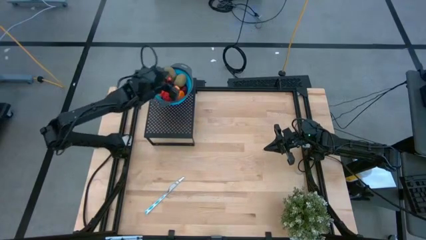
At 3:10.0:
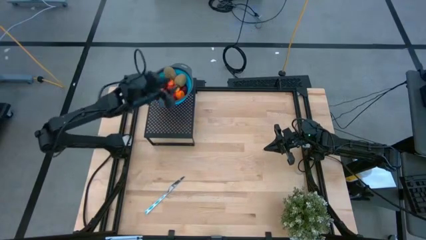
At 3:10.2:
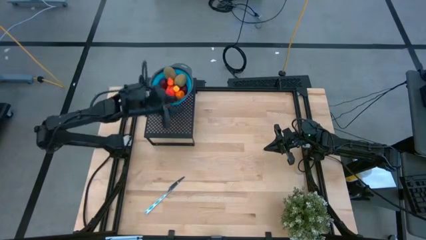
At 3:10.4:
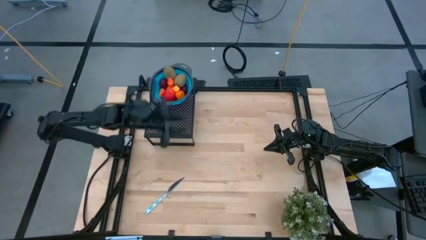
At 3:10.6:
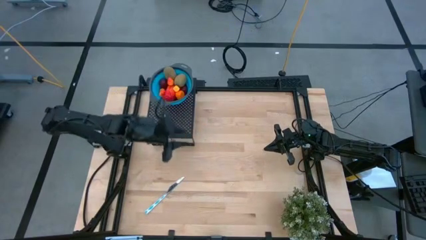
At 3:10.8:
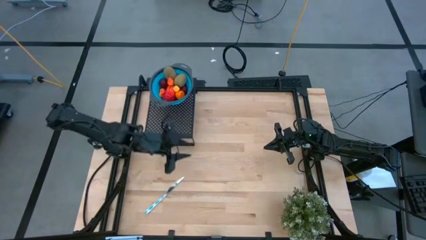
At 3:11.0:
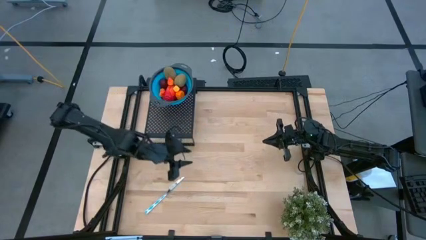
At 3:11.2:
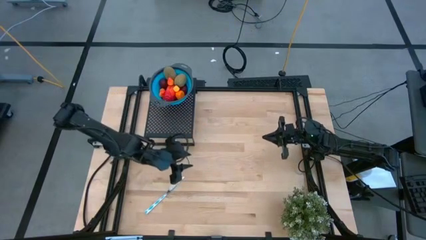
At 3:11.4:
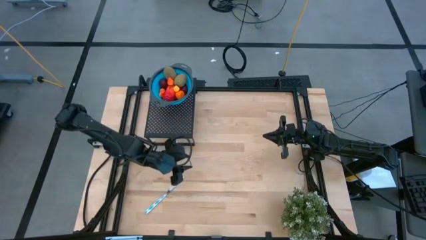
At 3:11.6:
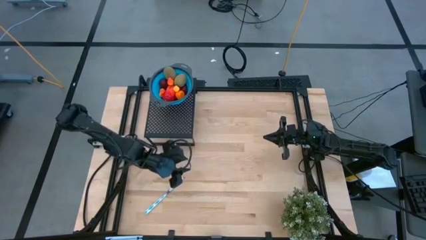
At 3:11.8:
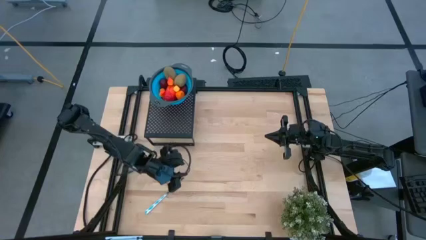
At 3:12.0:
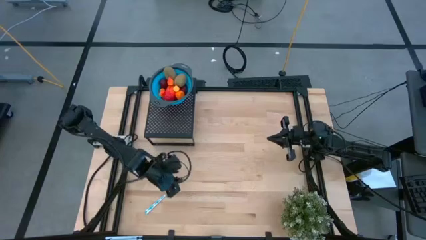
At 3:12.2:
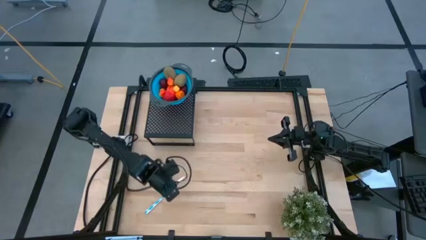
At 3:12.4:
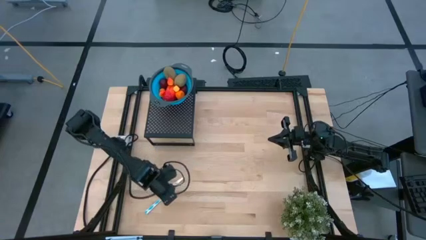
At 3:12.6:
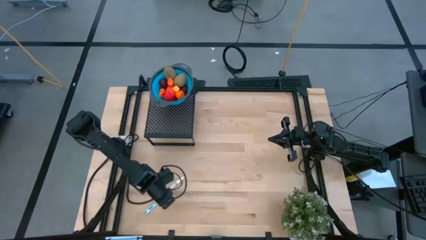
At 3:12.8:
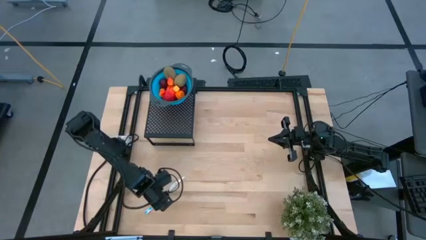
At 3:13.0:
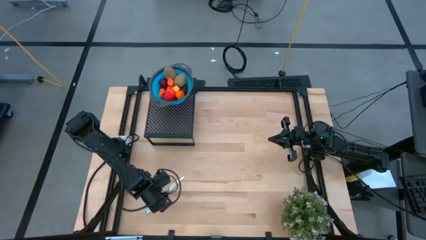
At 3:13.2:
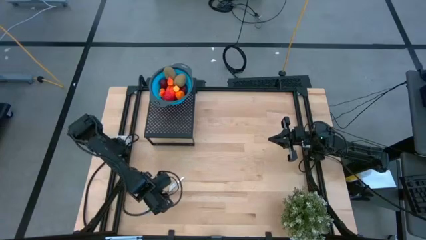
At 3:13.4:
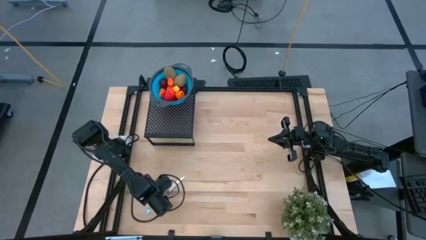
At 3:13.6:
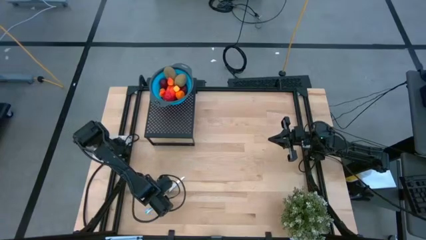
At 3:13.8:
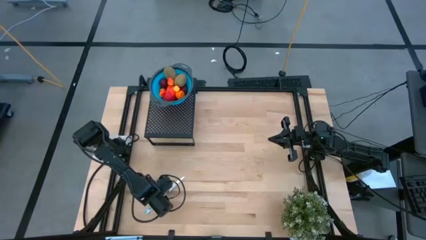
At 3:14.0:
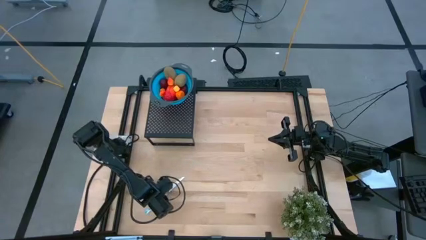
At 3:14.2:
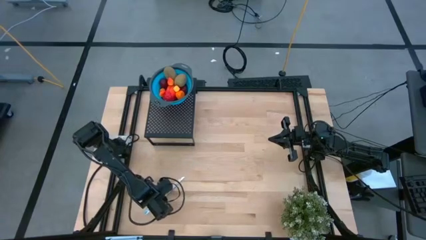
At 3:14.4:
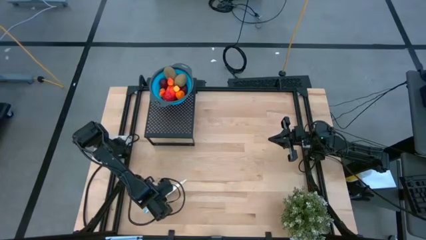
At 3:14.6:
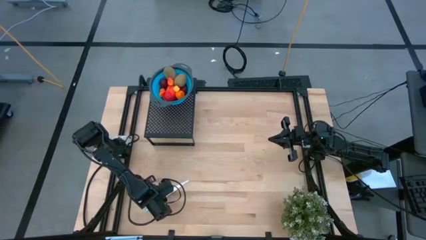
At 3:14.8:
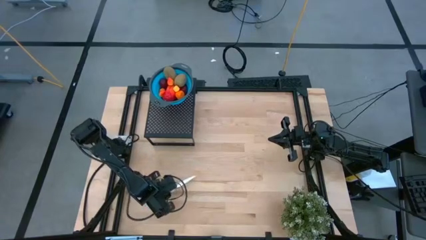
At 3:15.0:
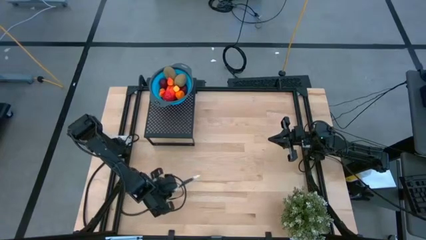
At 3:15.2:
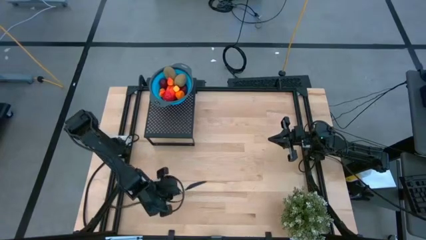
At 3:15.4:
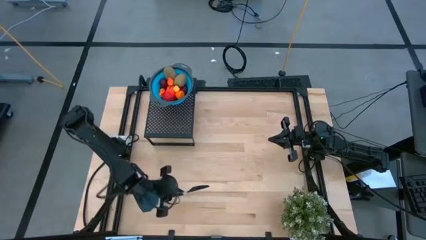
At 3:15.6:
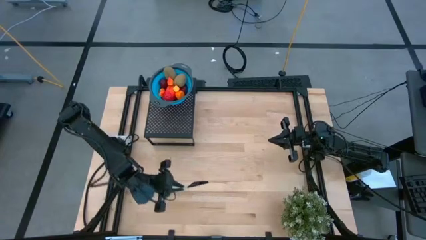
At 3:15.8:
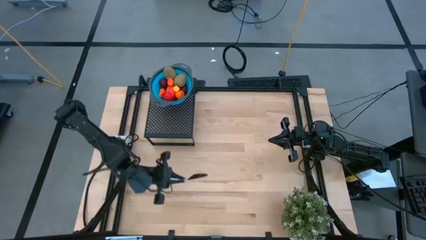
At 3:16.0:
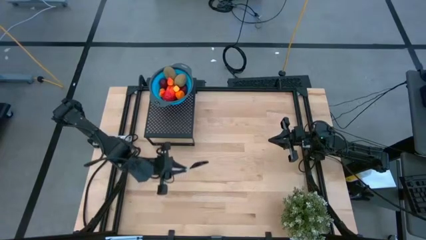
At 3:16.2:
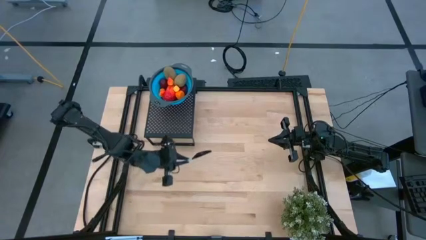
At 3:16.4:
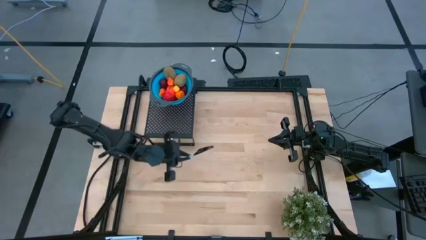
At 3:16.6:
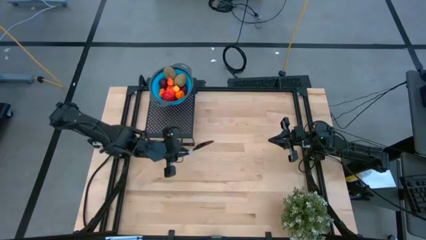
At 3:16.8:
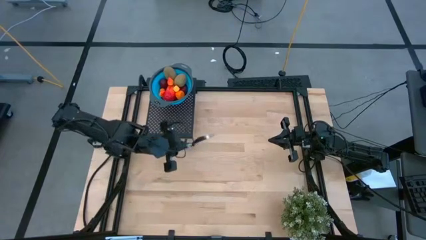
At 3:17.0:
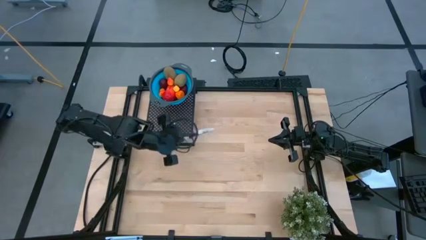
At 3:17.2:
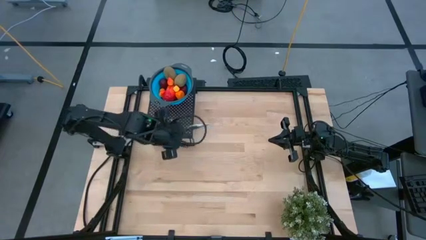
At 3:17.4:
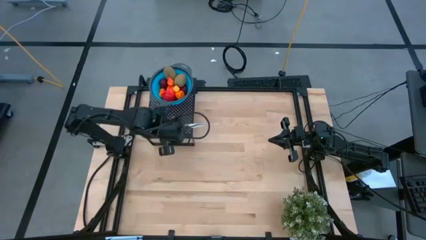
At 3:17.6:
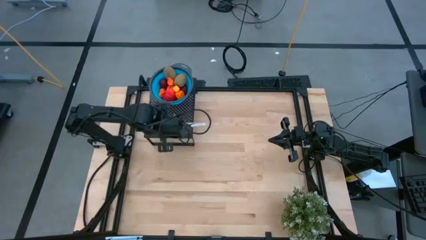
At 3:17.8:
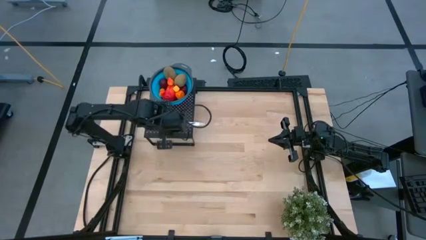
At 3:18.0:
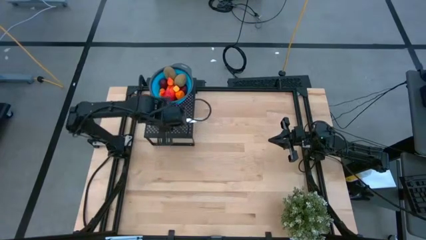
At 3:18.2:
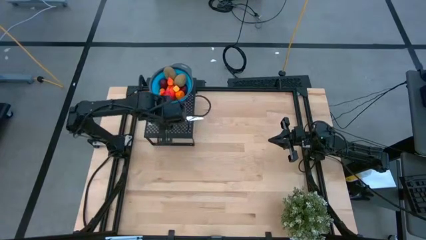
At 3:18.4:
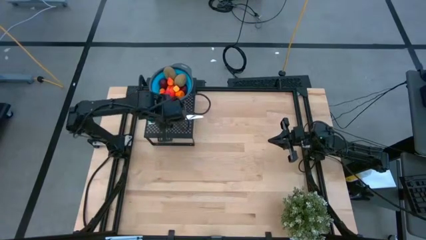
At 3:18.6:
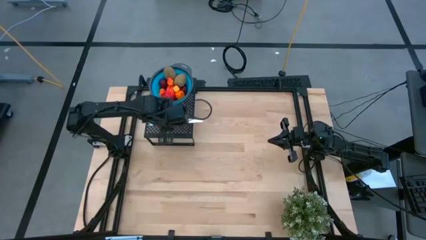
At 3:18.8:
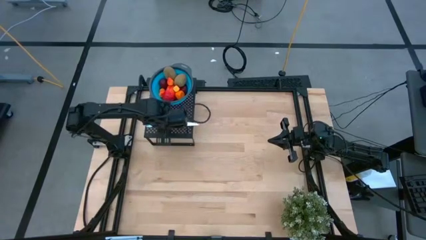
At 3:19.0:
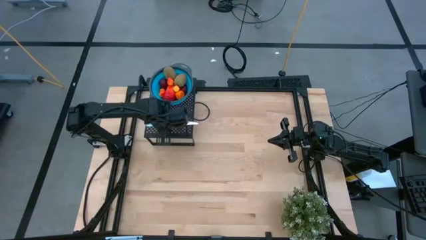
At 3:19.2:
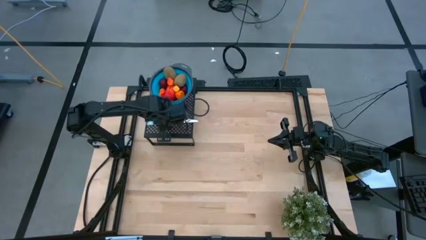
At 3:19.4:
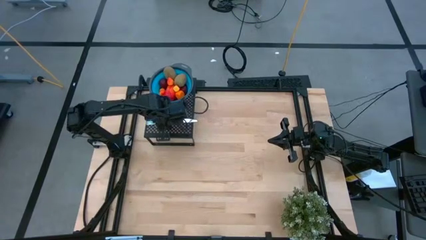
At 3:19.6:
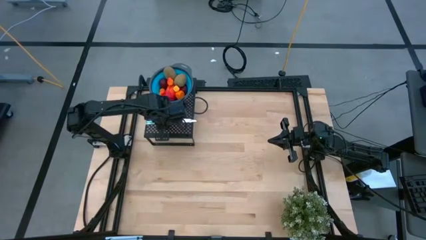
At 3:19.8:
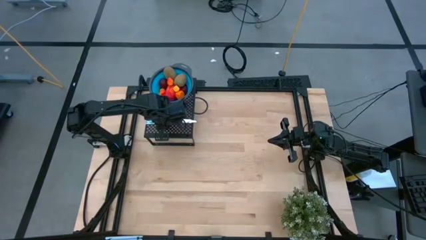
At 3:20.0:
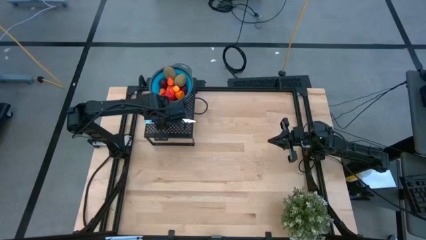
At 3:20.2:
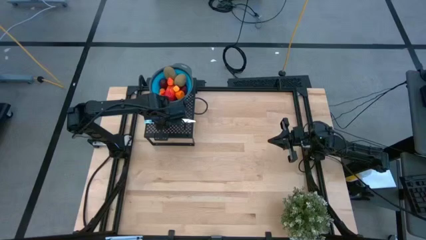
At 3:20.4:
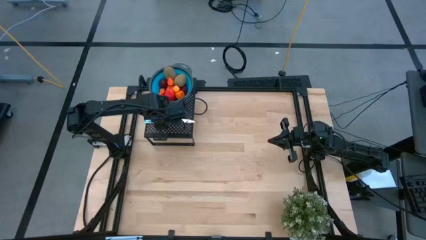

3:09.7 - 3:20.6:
Task: Pick & Place Fruit
Put the white blue table knife on the shelf

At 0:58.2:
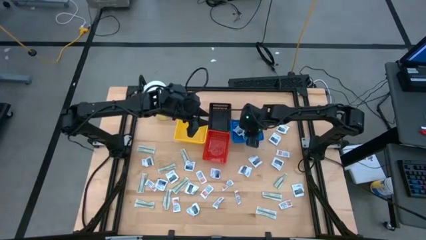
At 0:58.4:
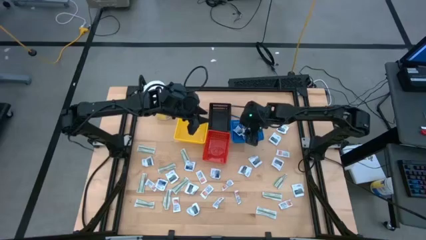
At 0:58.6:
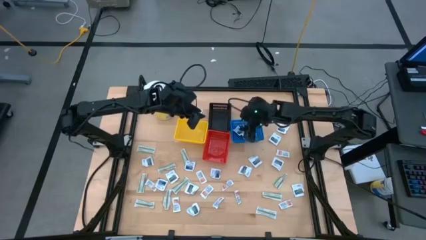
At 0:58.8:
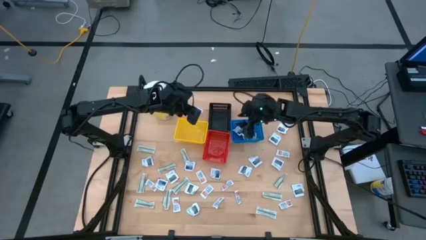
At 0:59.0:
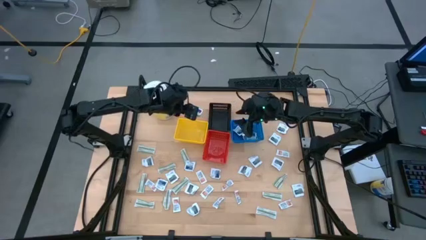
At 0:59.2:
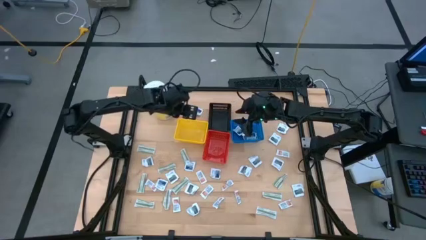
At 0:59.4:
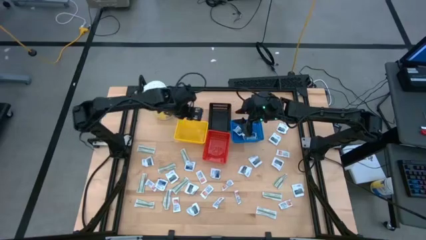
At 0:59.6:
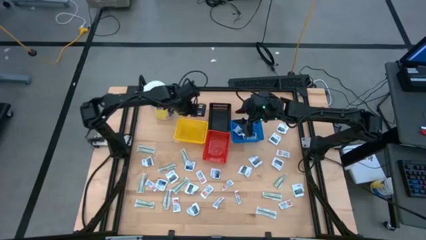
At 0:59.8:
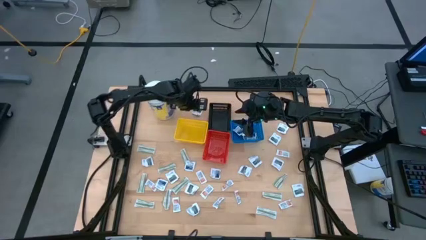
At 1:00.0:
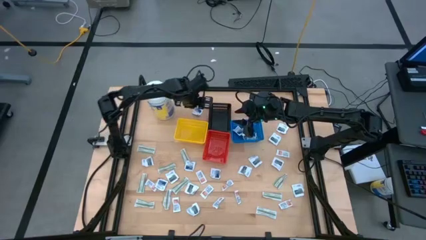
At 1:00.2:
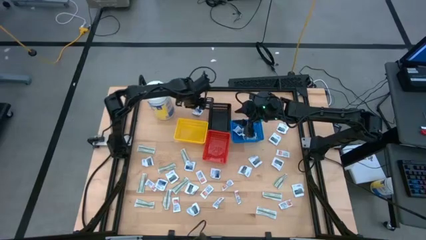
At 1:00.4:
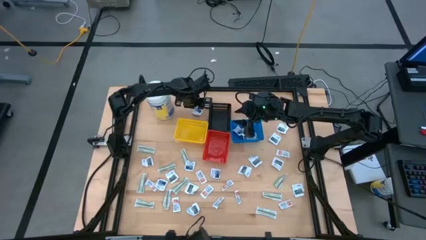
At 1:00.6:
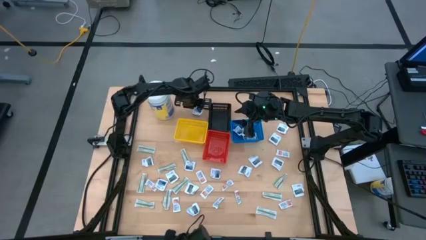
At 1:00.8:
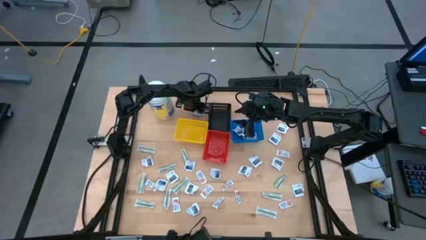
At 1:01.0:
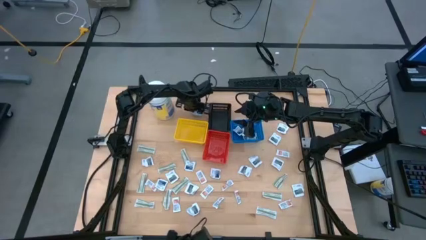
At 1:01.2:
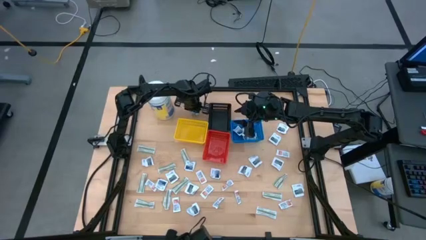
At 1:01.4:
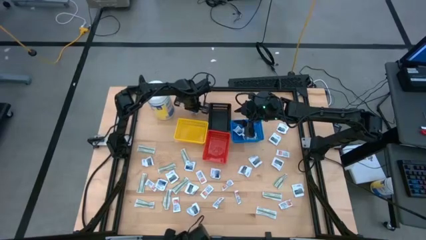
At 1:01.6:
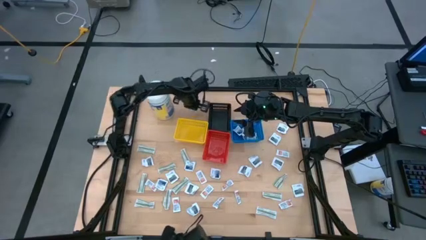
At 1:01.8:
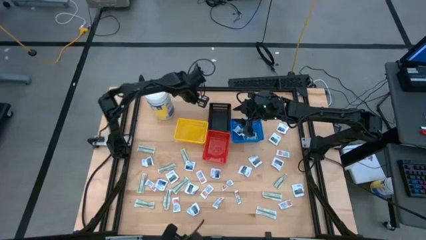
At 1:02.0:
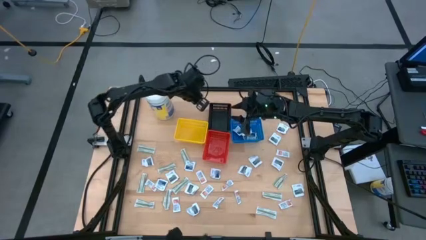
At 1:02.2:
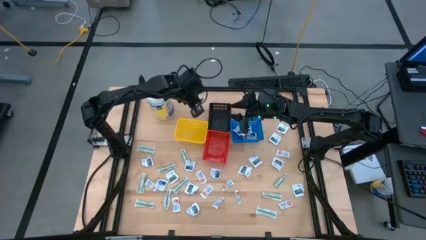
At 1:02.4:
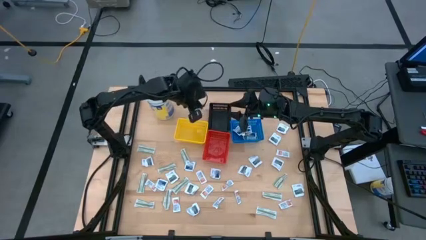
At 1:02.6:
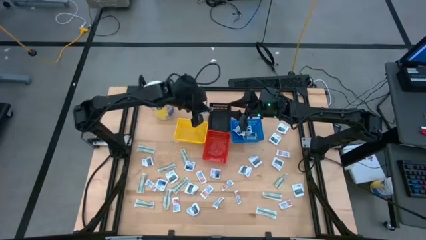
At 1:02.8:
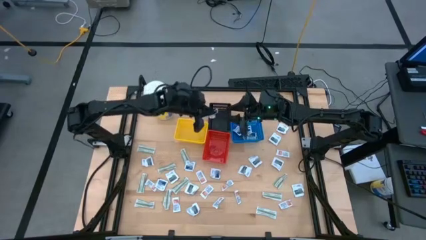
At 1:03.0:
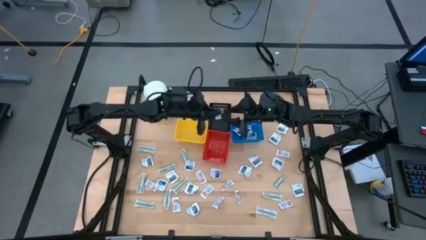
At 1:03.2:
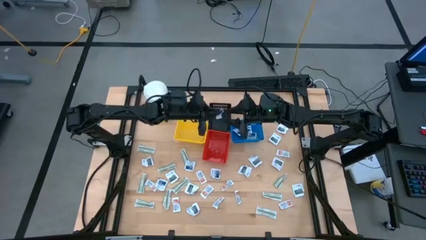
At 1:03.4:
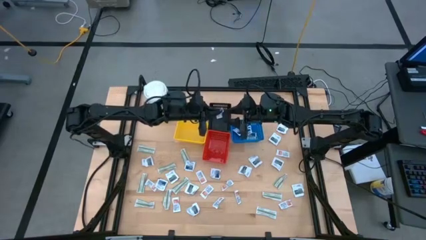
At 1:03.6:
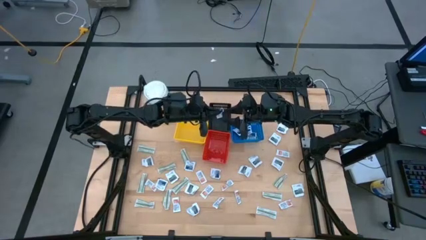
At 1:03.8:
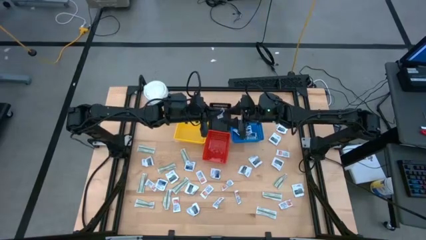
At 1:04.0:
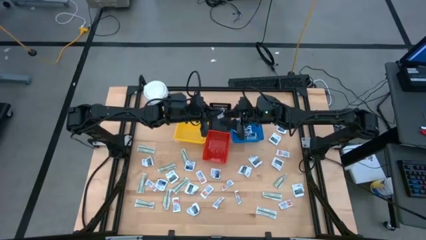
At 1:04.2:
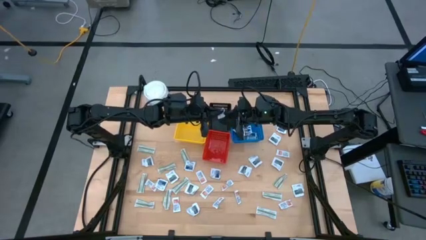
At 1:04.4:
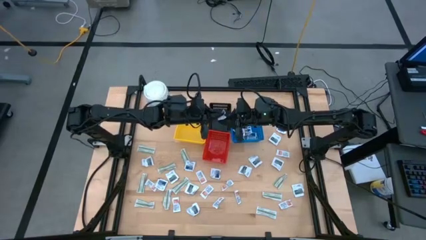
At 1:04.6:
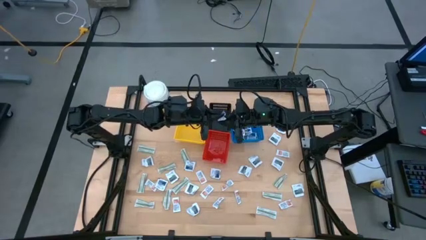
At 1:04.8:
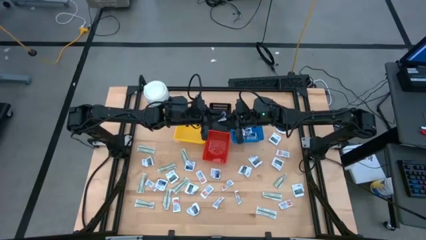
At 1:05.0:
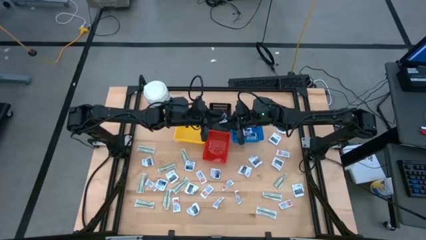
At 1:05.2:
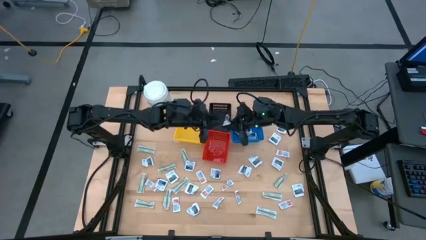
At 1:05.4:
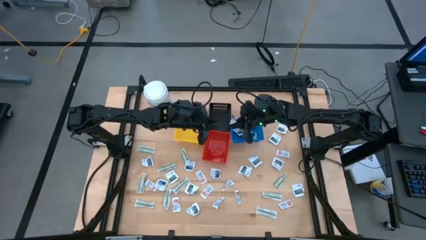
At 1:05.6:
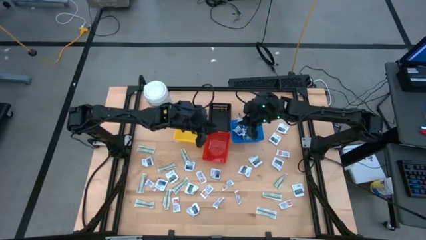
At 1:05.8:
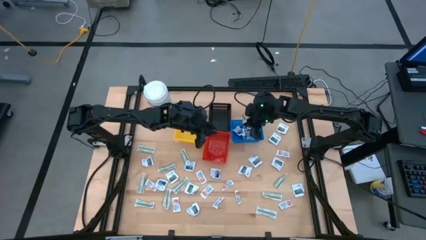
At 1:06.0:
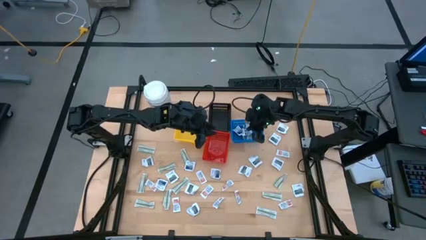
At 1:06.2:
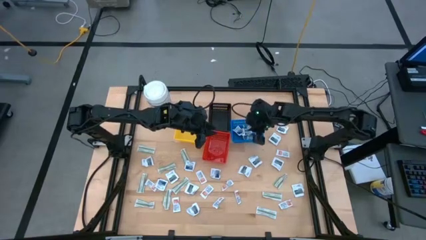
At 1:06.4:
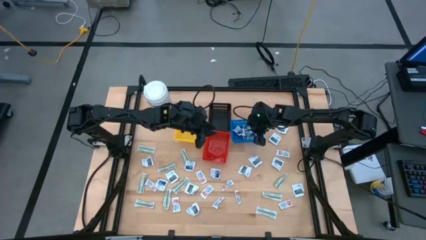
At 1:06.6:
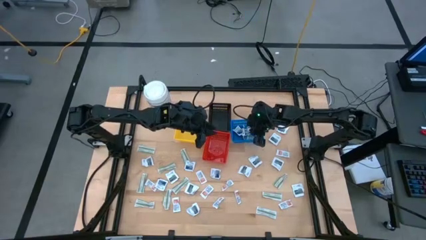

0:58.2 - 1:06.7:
Task: Pick & Place First Aid Supplies
Put the alcohol pad into the blue bin
